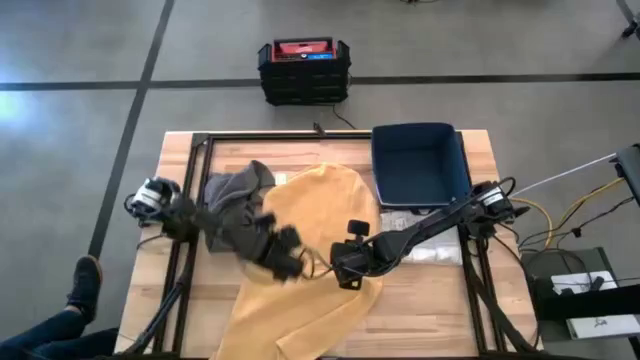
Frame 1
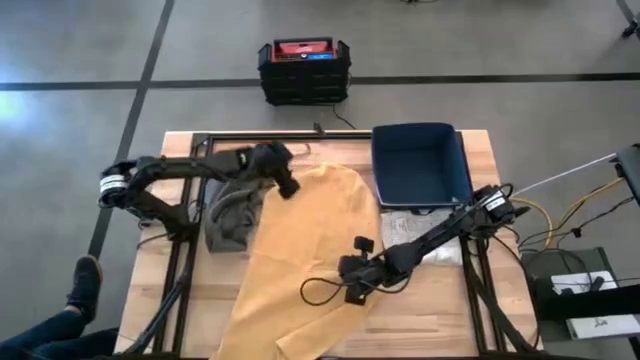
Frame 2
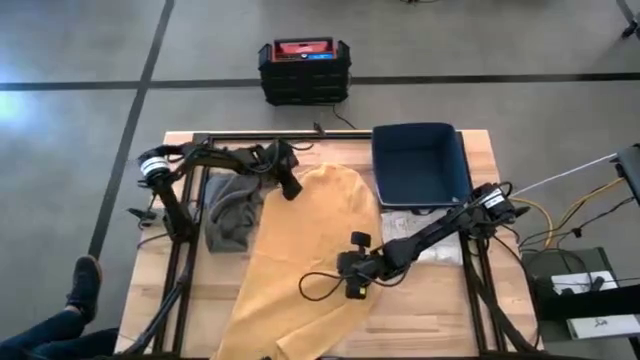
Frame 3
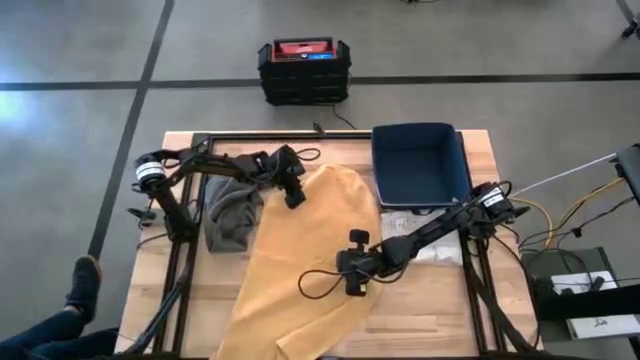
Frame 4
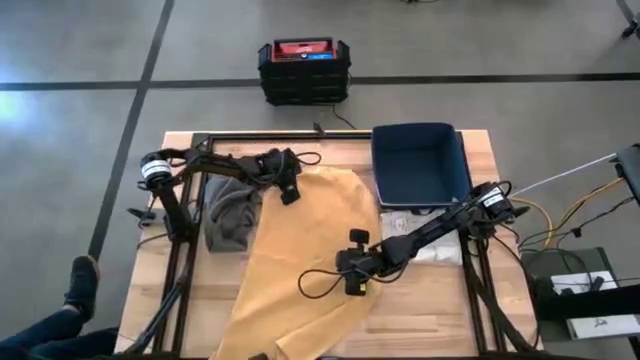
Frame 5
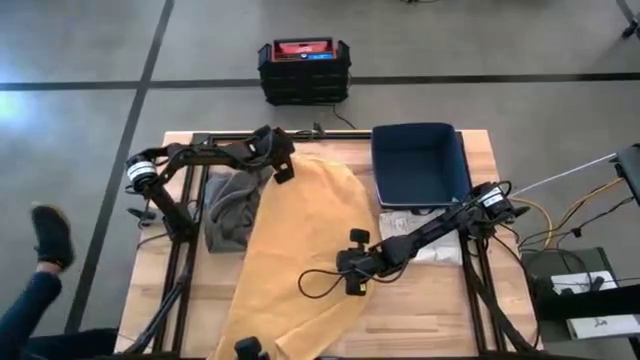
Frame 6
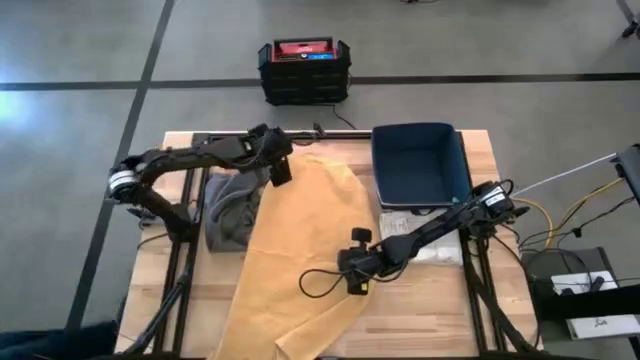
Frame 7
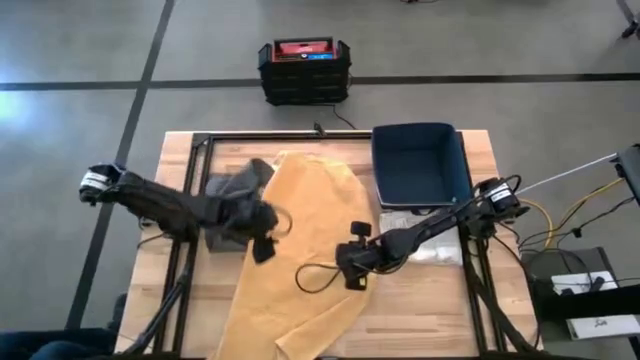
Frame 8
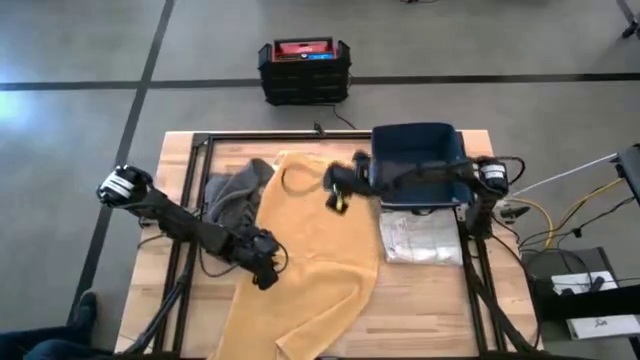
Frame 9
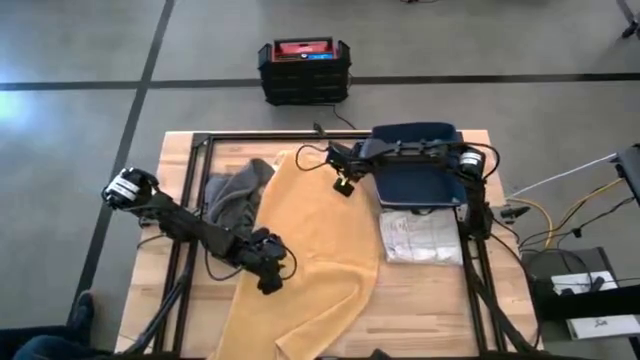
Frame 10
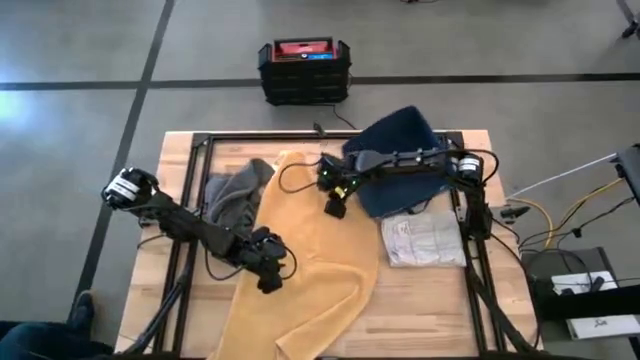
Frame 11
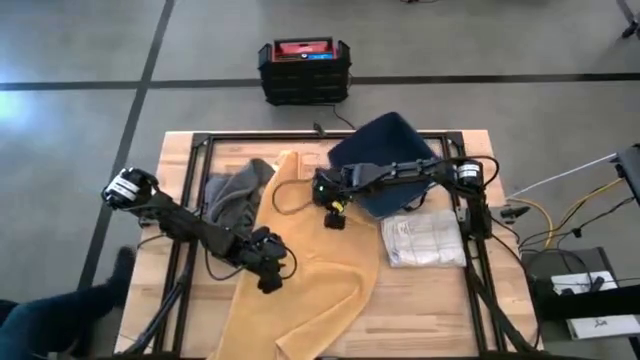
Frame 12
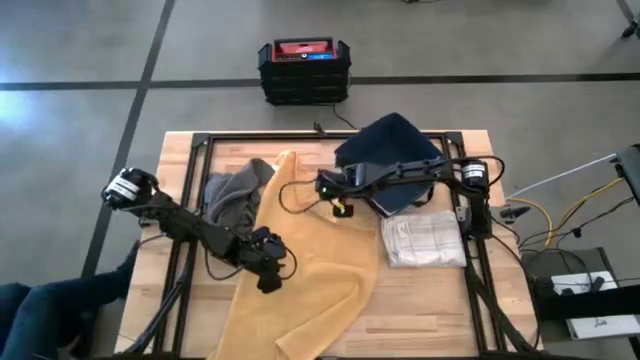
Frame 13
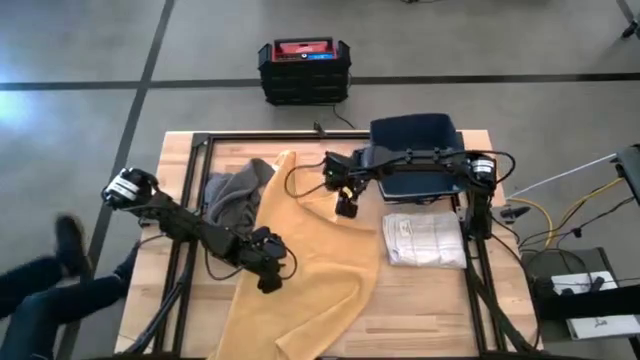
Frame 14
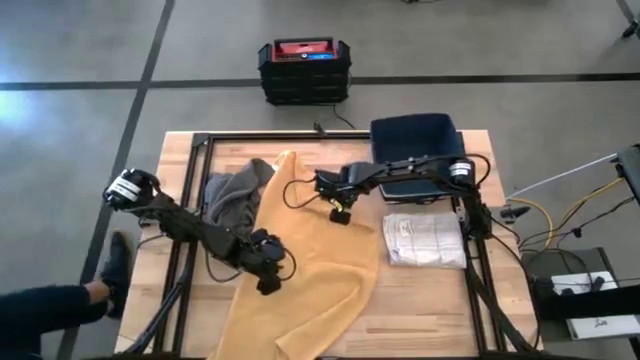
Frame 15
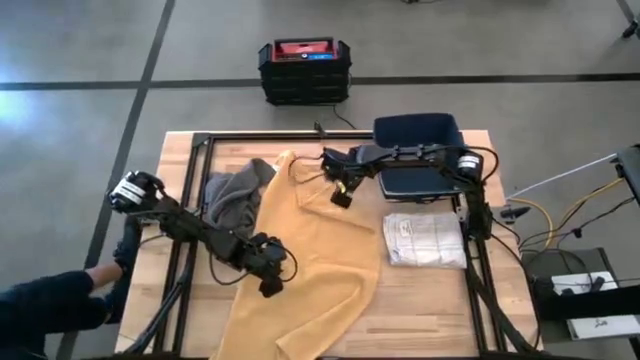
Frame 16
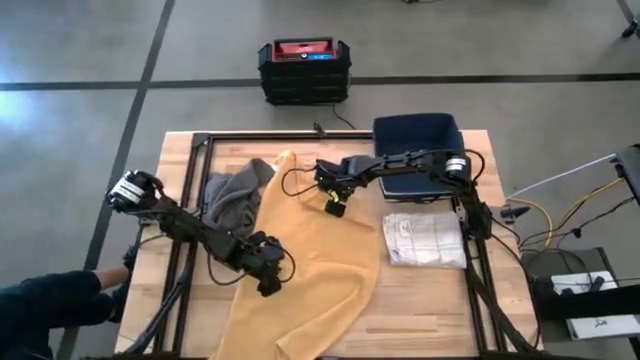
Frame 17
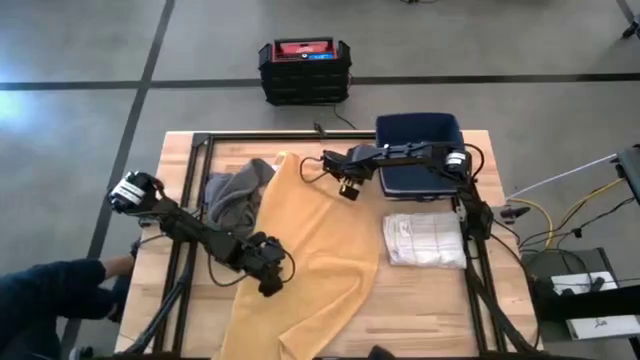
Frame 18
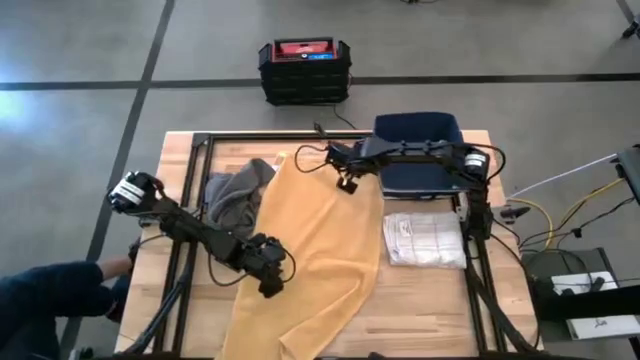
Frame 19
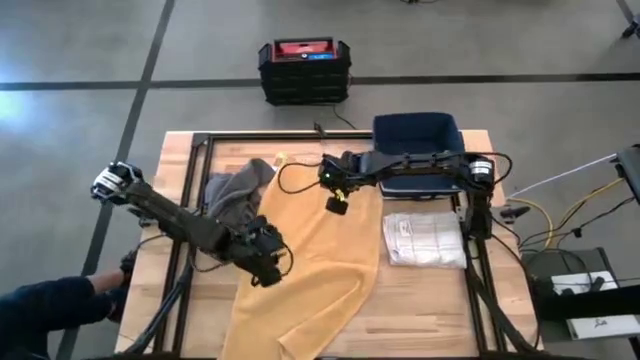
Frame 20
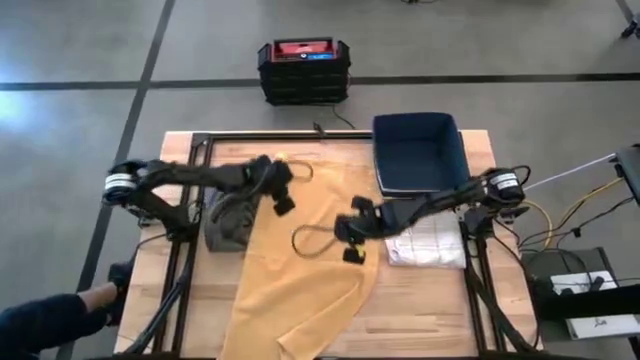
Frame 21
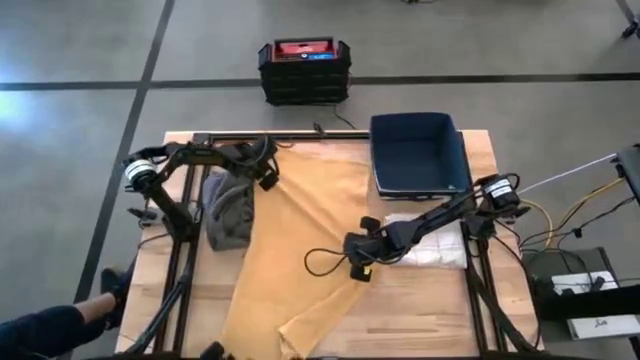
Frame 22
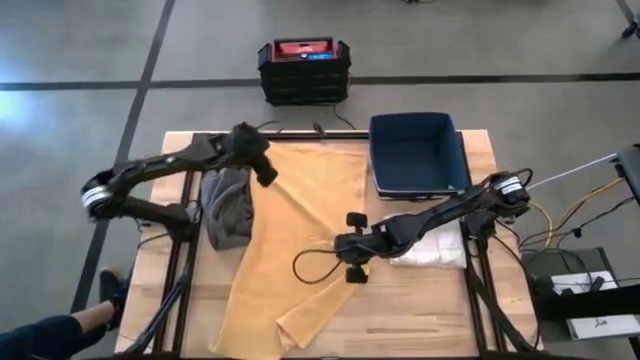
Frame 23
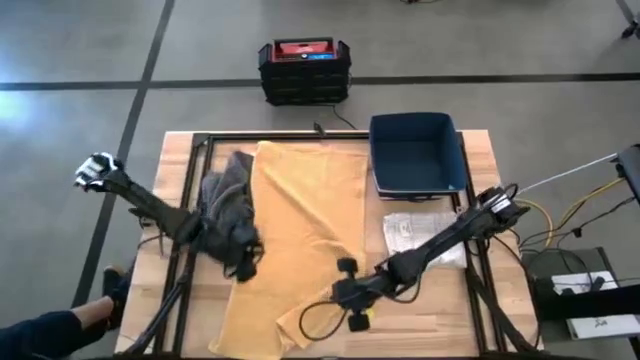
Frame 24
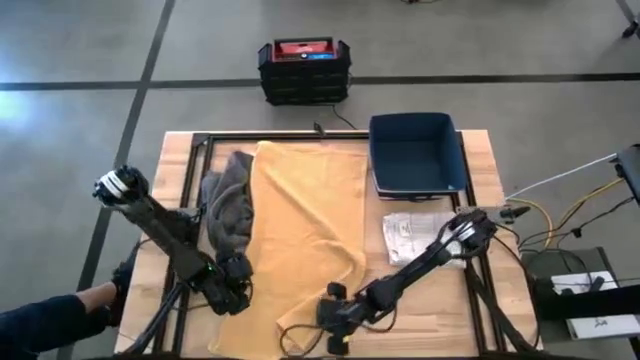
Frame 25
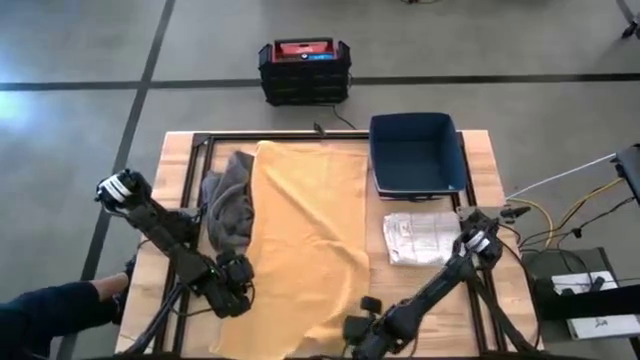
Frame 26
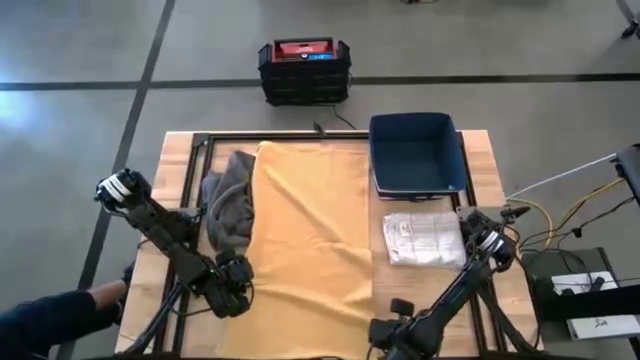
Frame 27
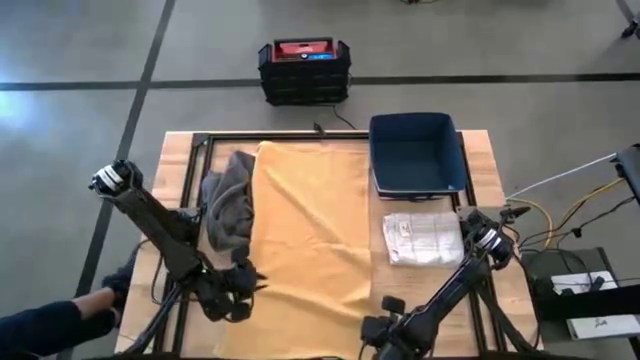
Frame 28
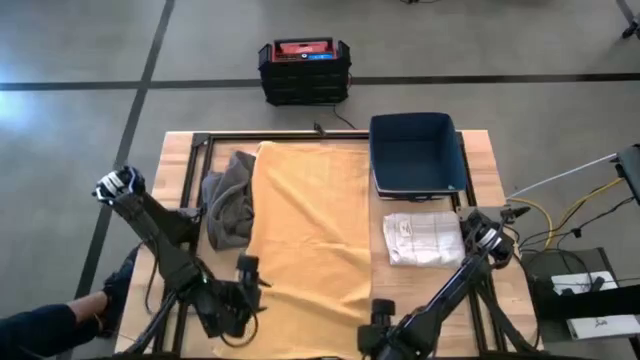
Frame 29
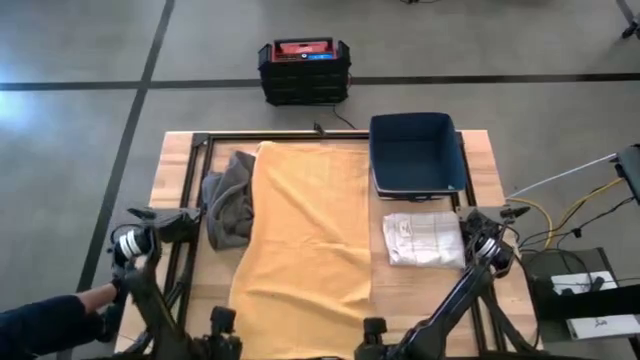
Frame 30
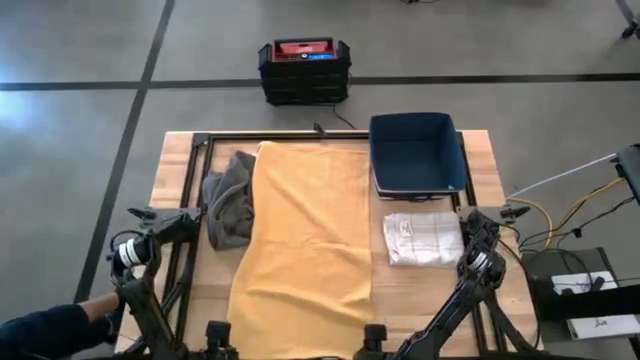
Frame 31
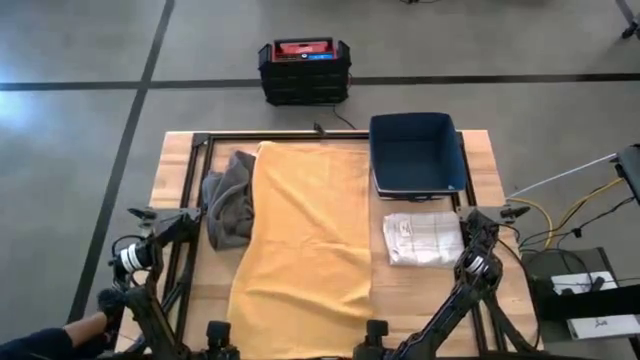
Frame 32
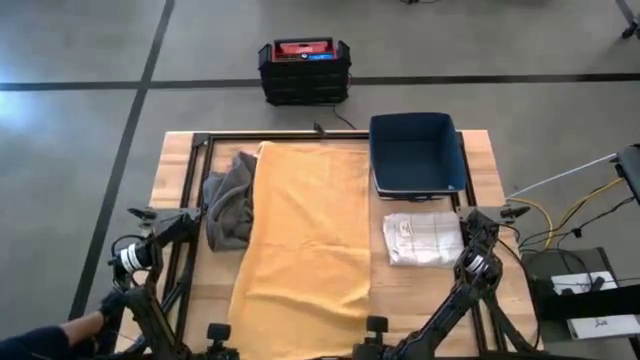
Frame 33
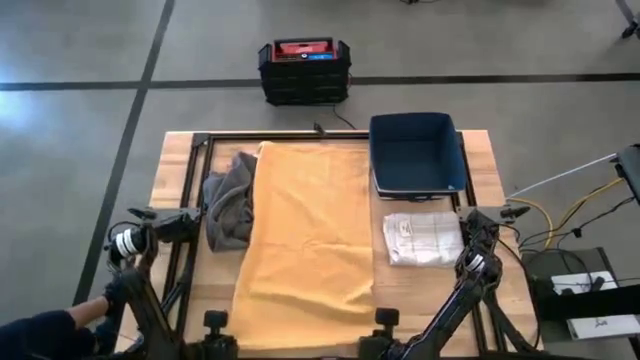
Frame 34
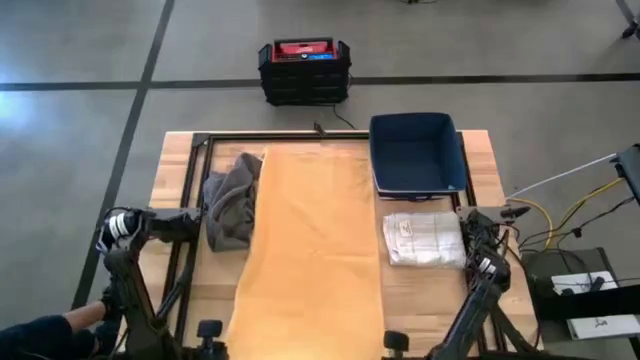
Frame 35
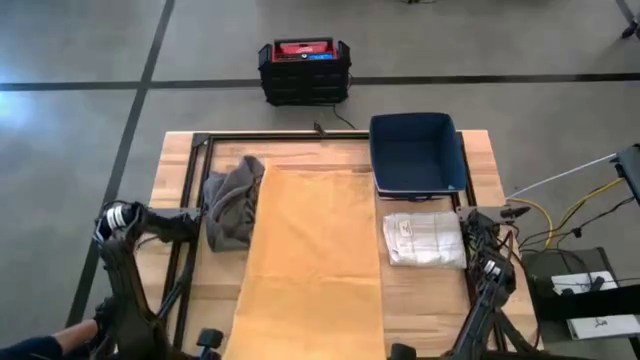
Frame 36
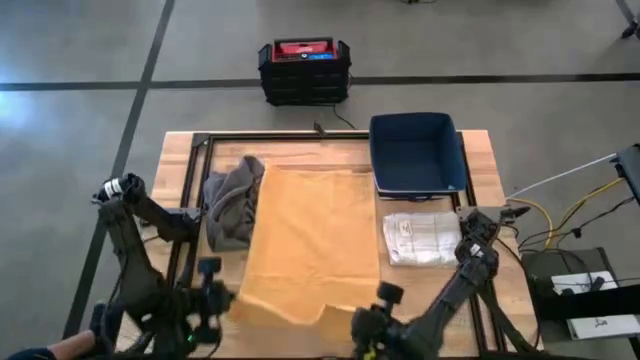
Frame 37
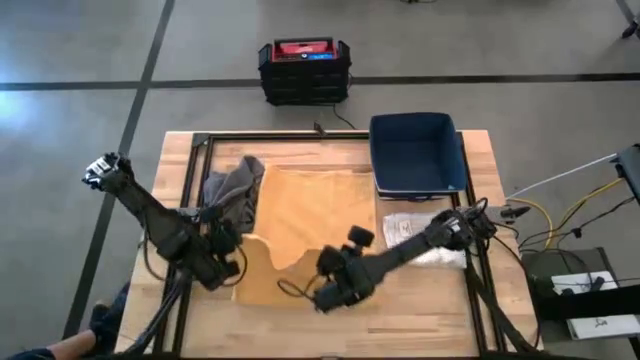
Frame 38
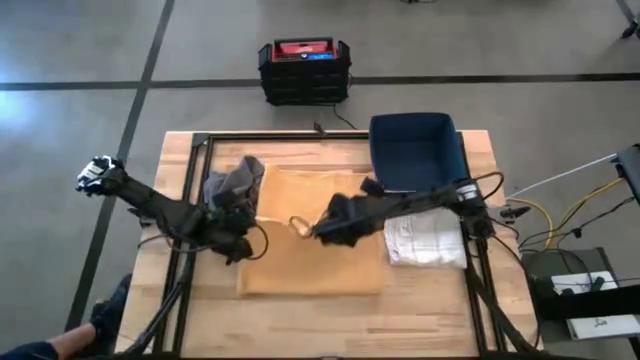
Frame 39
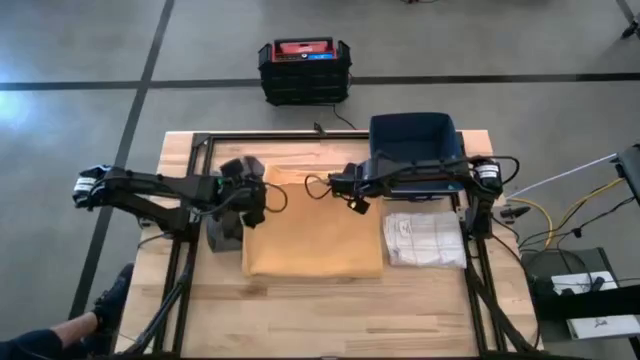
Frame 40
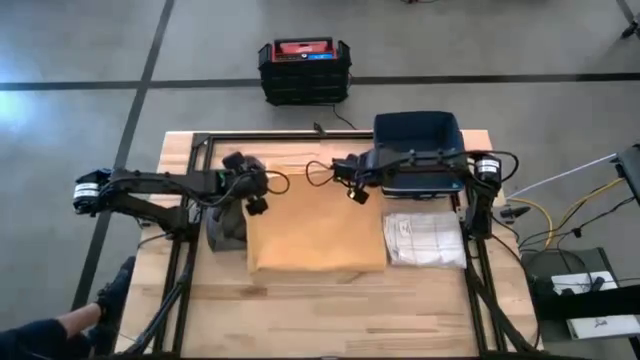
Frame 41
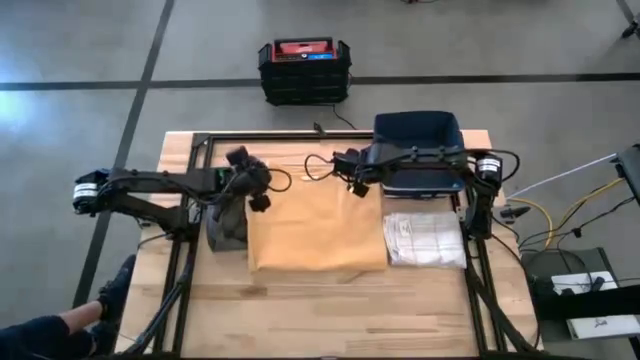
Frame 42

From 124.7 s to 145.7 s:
Task: Fold towel
Fold the yellow towel
